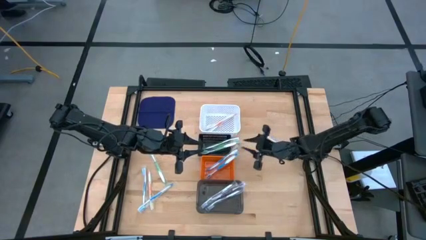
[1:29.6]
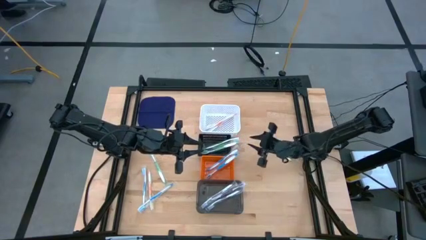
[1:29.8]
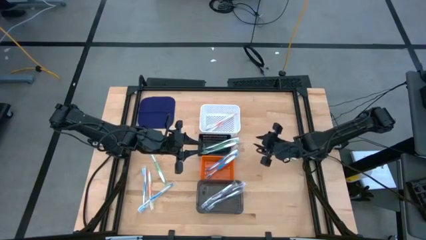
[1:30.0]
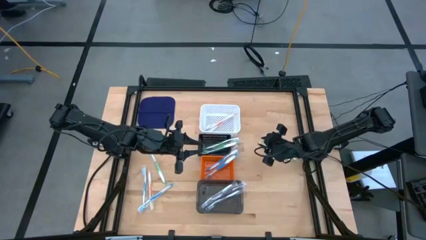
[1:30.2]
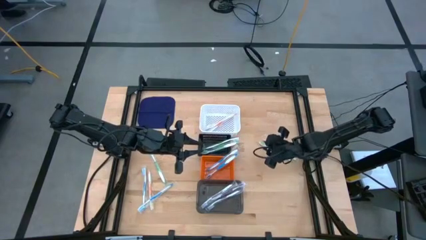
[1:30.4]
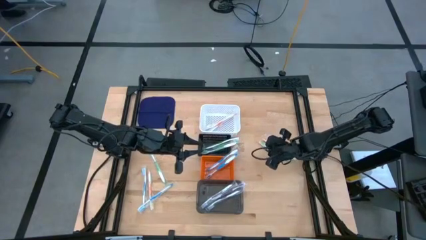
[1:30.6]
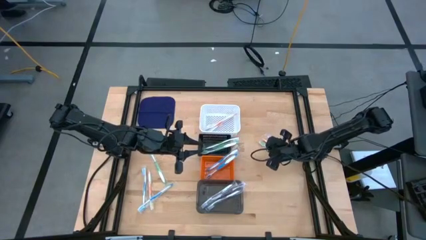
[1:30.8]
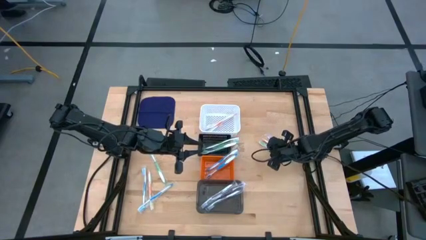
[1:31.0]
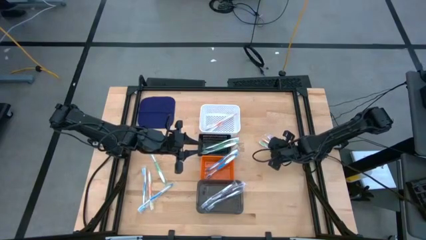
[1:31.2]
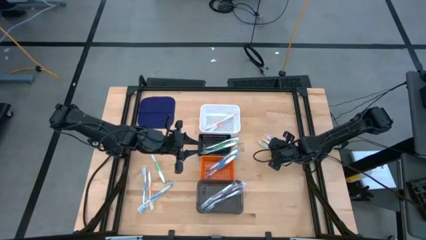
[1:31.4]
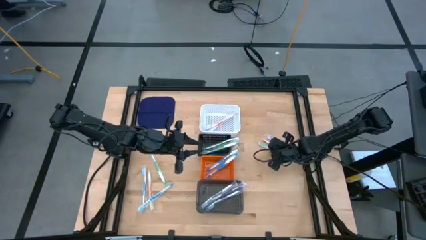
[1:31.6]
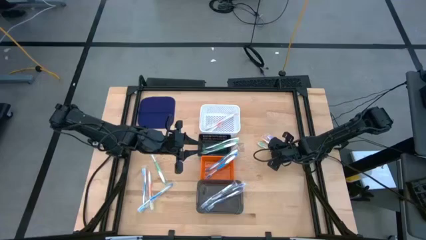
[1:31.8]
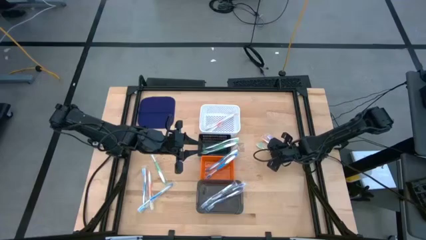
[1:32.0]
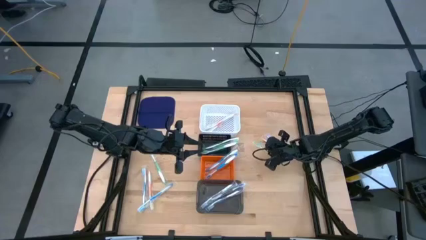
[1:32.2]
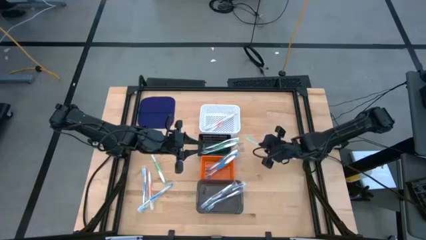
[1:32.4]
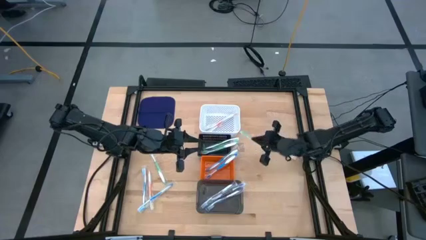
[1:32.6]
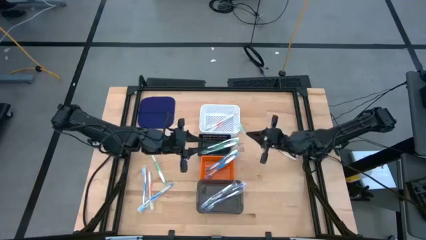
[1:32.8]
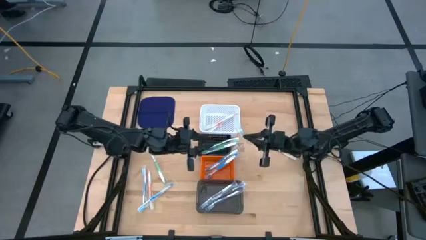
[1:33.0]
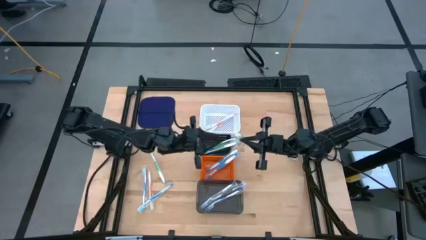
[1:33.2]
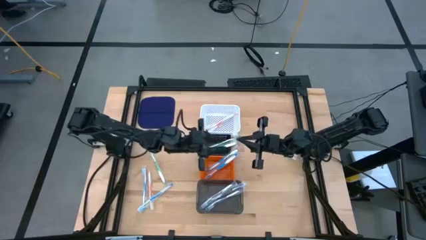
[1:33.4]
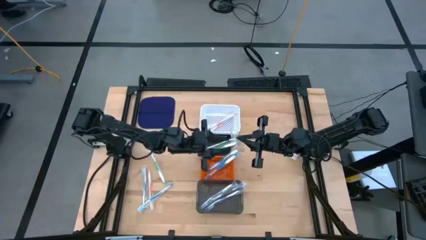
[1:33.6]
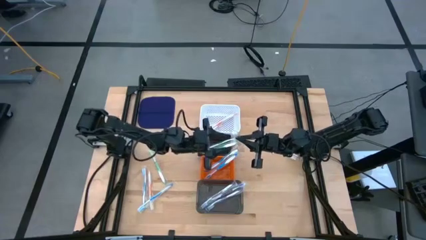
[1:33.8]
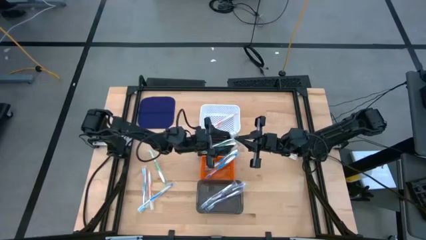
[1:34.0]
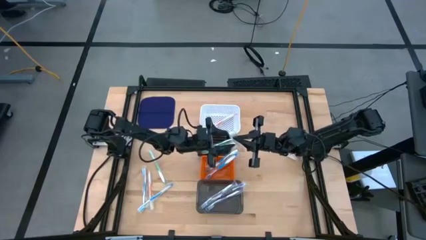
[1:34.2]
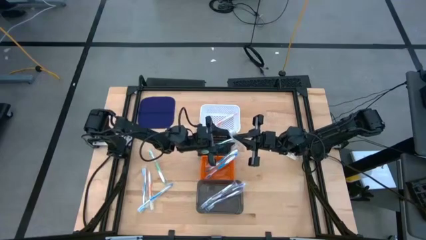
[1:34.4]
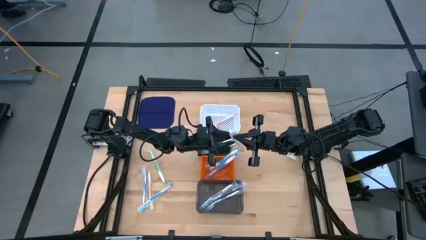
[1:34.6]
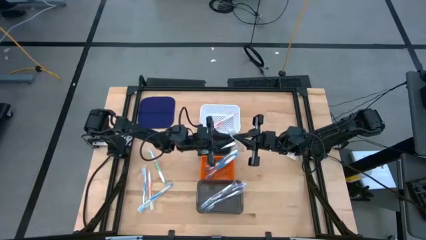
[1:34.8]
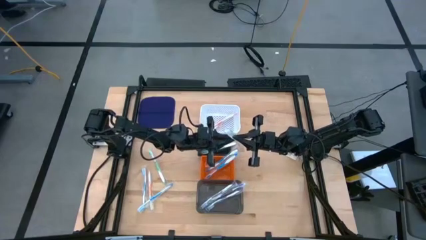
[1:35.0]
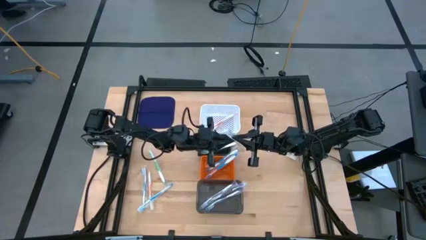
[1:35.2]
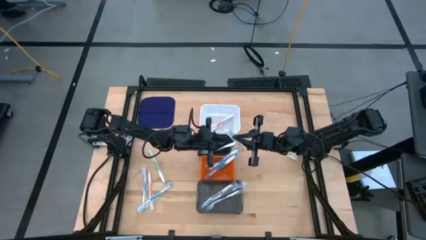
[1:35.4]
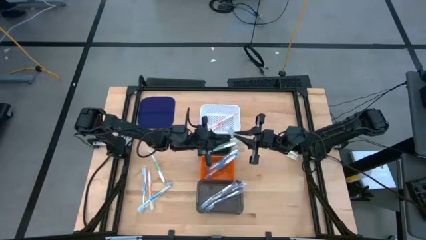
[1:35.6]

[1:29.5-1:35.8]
Task: Pick & Place Toothbrushes
Put the green toothbrush into the black basket

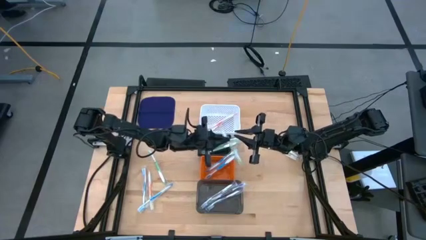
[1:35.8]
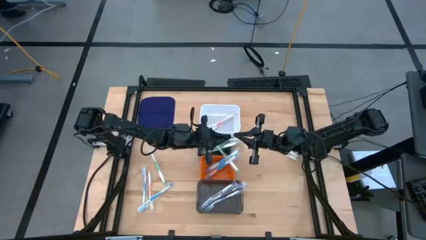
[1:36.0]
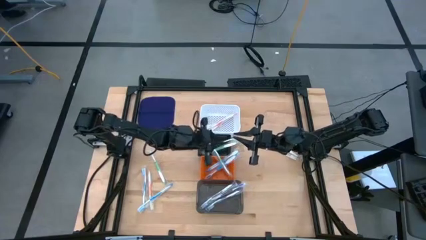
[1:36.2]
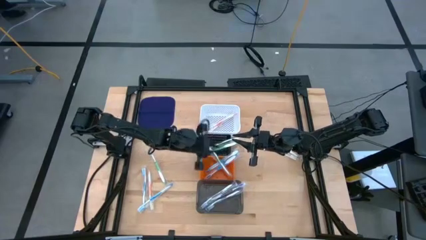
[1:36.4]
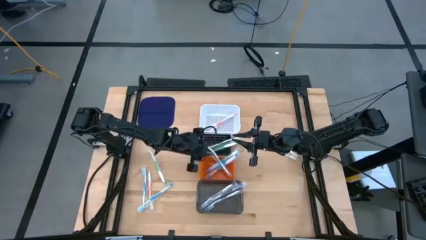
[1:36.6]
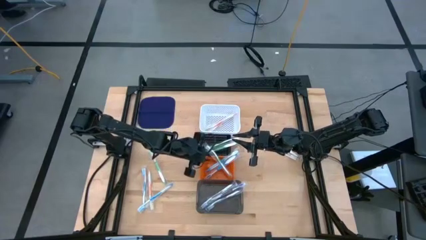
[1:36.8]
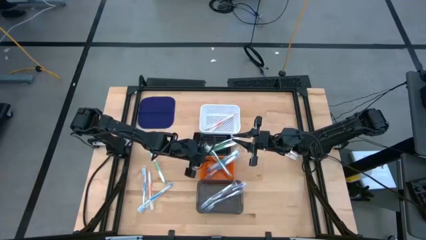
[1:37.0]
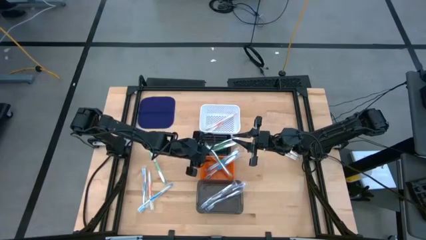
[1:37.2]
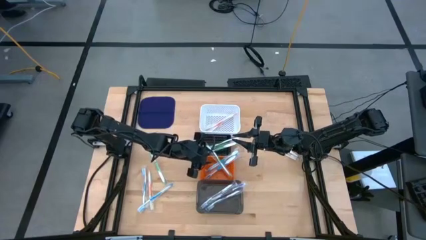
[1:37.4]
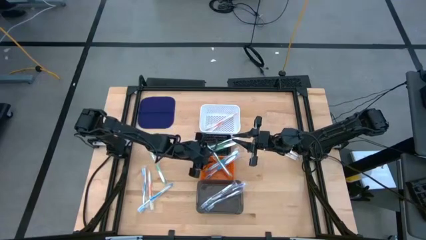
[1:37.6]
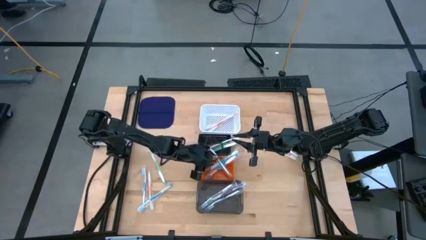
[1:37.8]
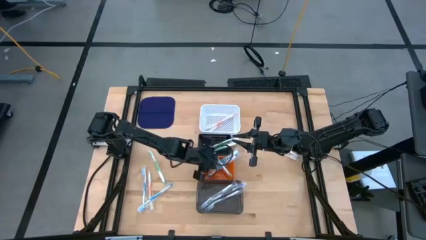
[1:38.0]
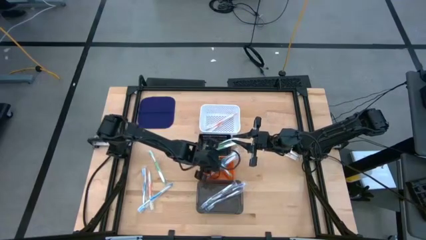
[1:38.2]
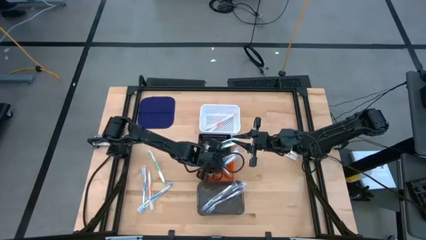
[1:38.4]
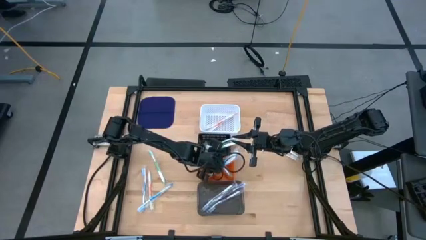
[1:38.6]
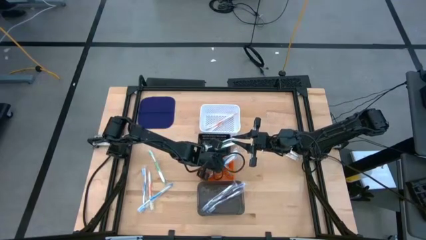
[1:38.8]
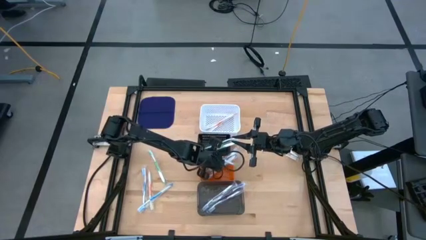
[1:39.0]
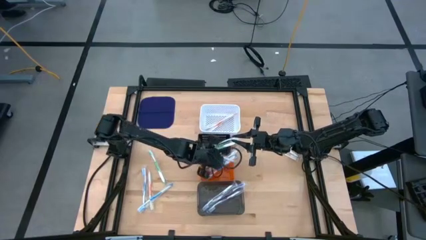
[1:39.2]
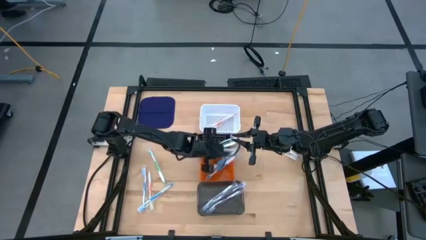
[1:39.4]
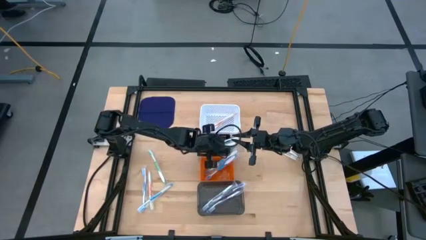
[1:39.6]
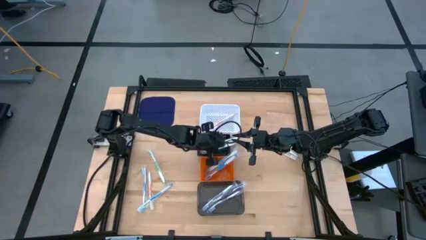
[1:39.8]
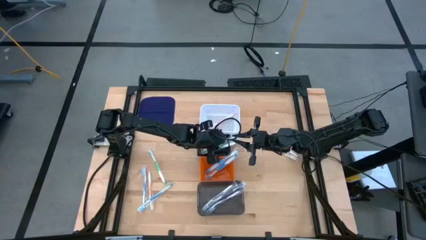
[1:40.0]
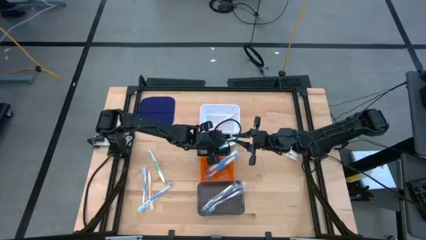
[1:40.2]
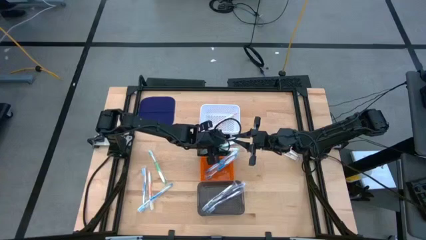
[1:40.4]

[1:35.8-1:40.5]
Put the green toothbrush into the black basket

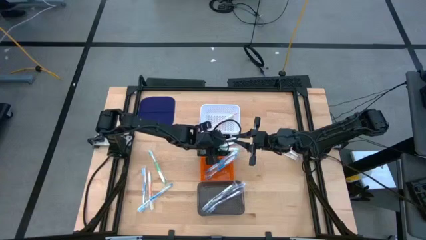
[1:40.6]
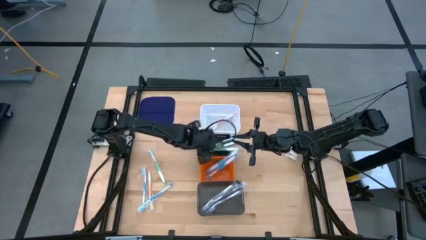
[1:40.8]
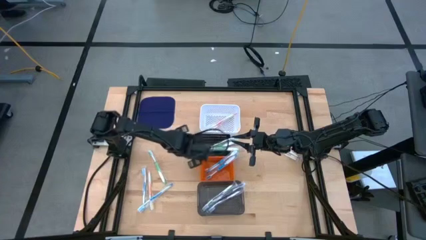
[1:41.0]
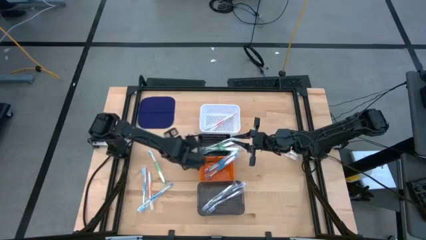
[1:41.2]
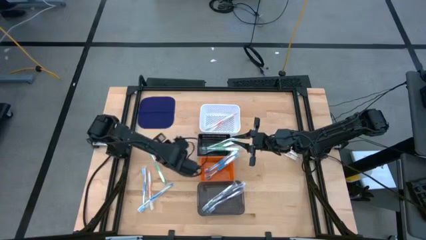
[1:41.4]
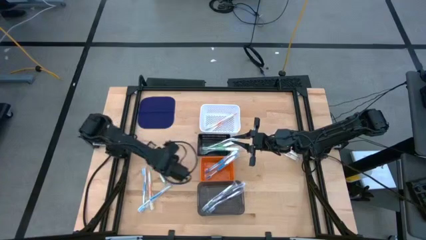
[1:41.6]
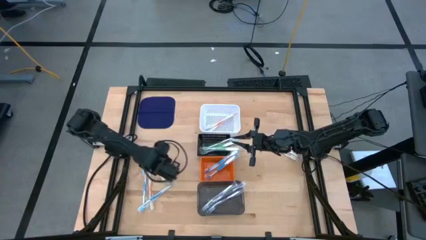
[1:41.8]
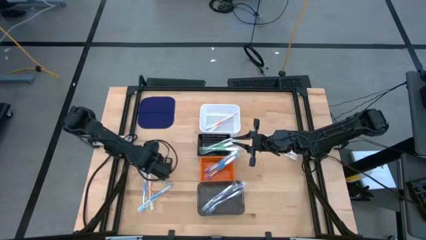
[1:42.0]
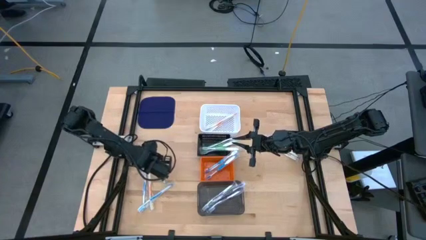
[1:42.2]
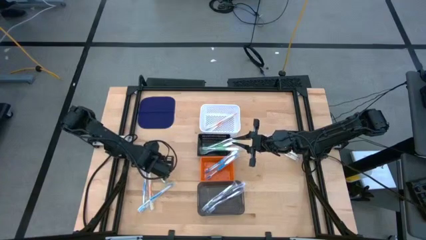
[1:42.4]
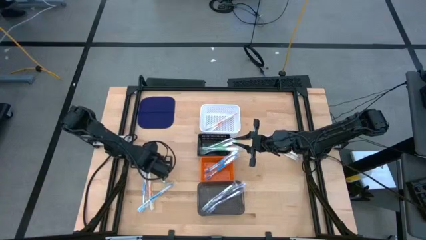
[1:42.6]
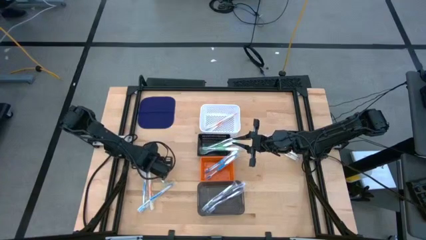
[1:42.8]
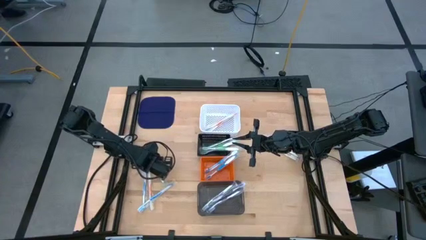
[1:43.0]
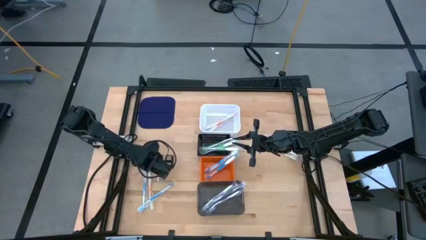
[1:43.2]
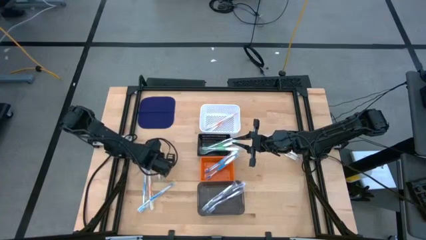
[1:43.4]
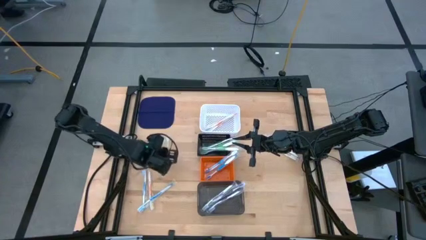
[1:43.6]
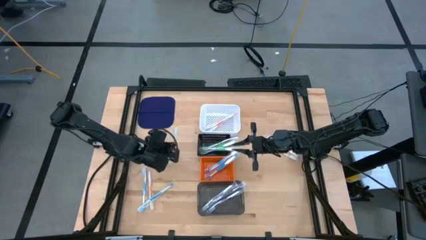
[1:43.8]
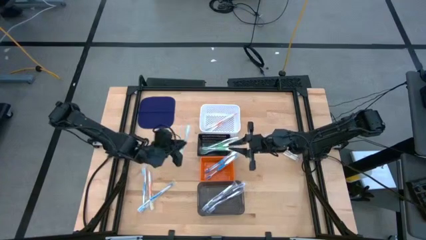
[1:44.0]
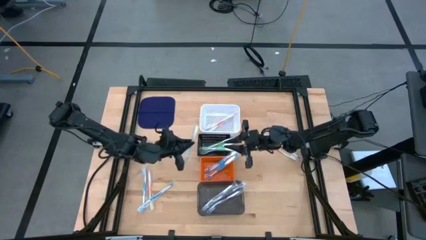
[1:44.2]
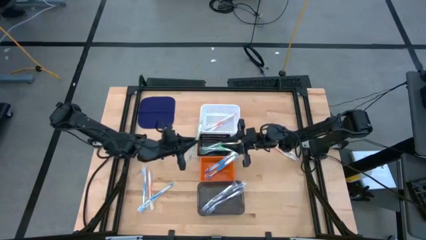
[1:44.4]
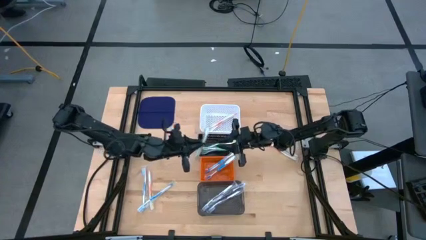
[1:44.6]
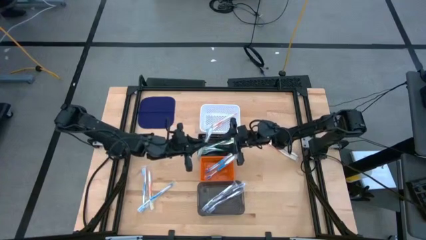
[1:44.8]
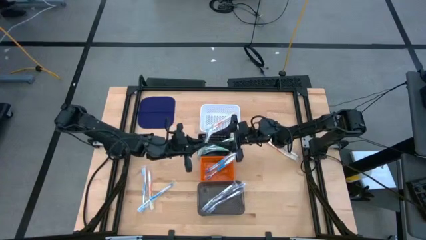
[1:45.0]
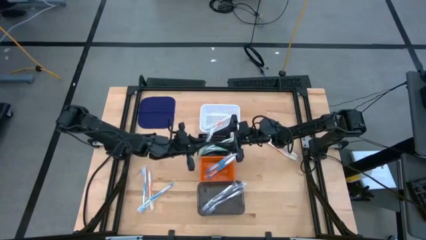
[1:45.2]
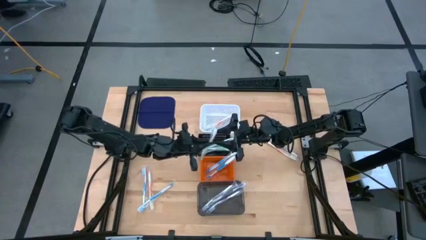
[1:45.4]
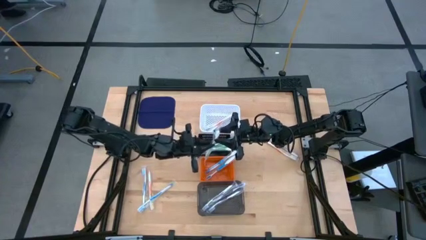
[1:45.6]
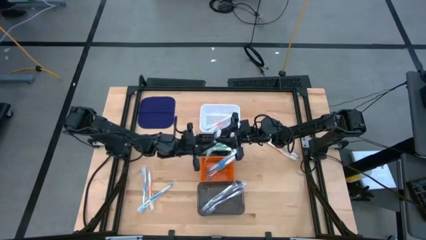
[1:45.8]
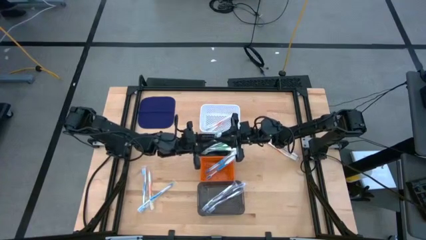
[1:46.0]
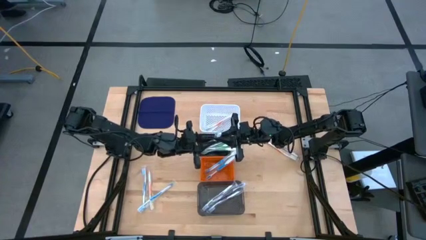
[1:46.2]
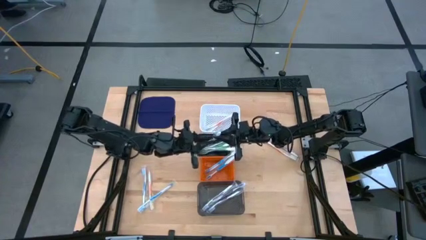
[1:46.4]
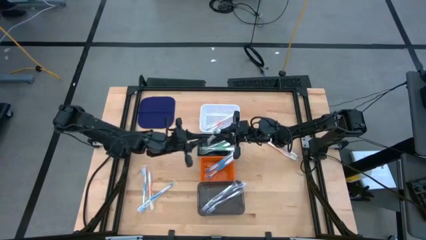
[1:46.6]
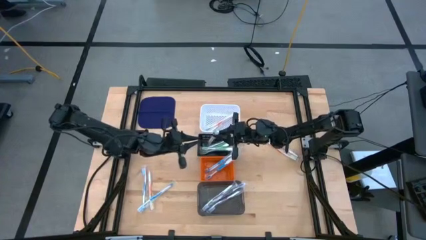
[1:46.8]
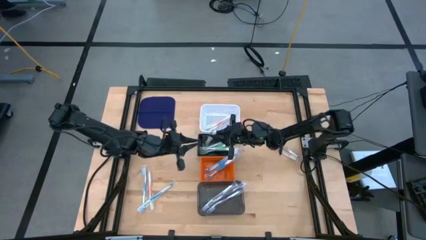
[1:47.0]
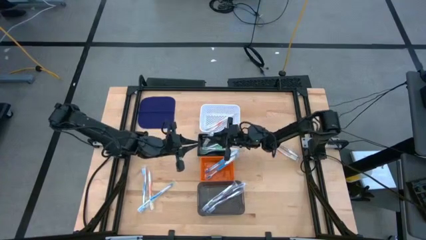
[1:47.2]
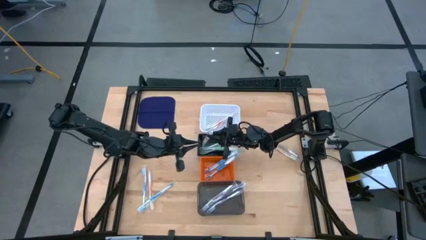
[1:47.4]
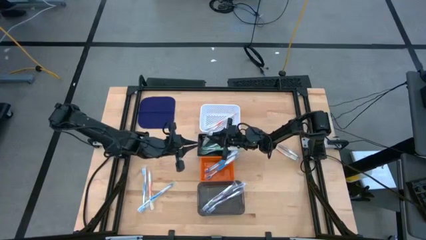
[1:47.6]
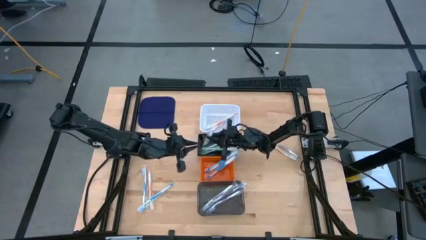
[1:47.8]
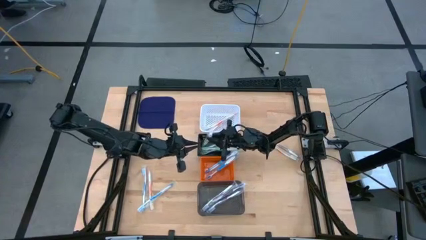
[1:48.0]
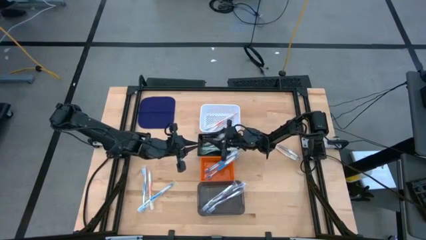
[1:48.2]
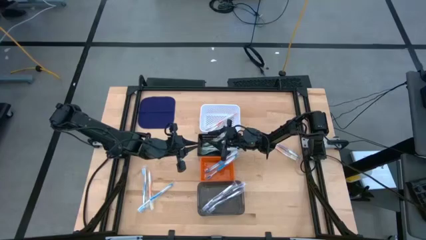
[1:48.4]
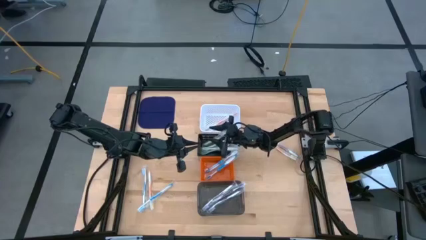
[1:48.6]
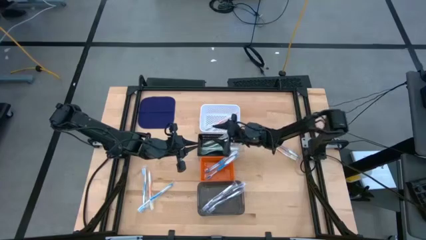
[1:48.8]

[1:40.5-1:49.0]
Put the green toothbrush into the black basket
